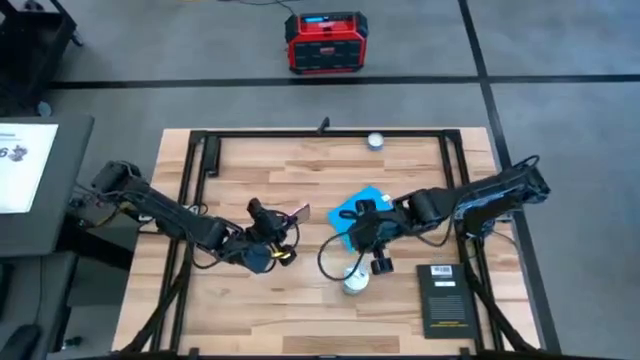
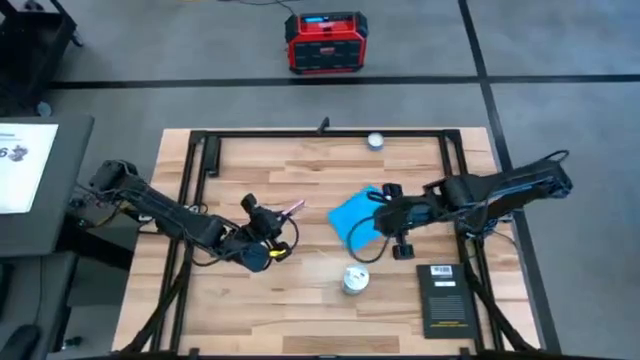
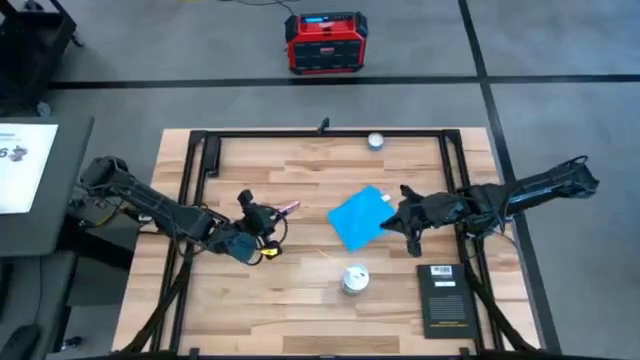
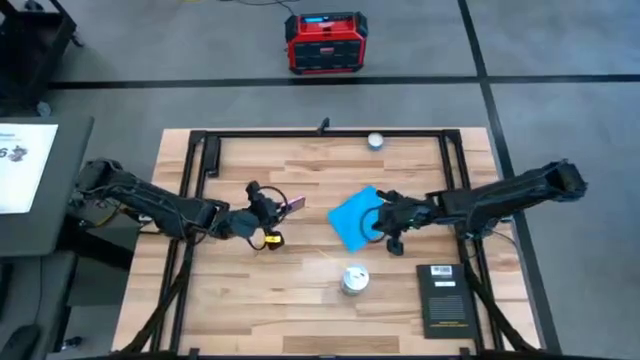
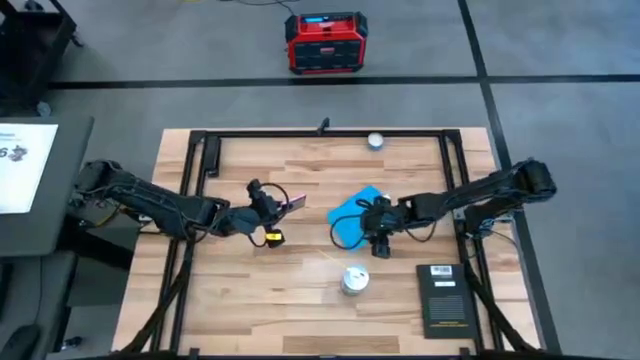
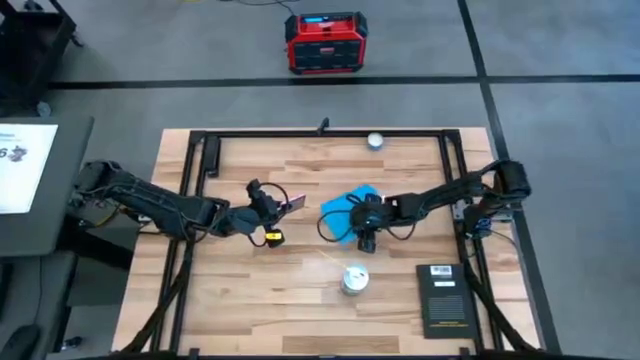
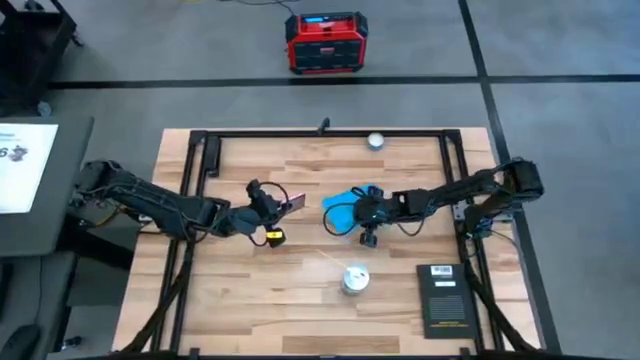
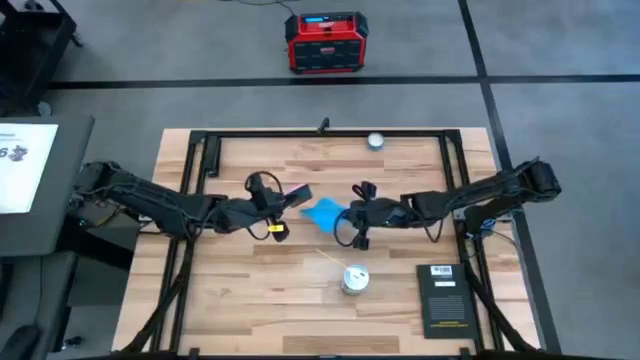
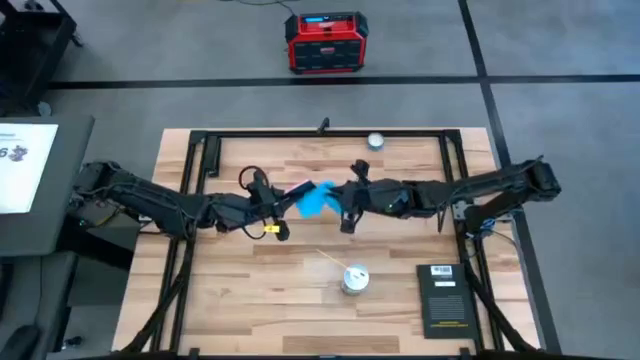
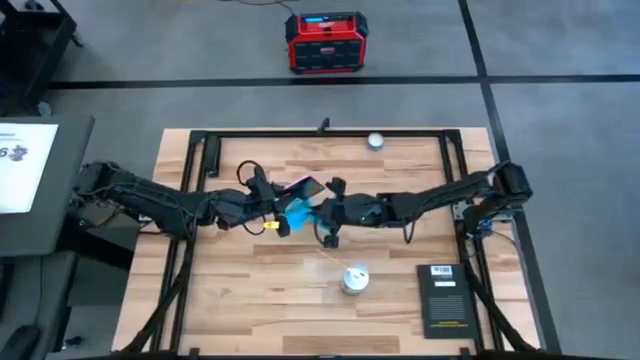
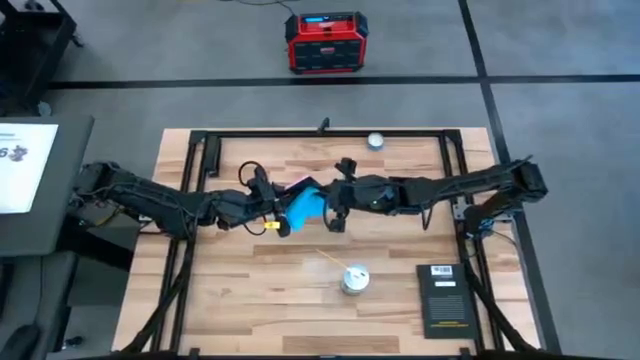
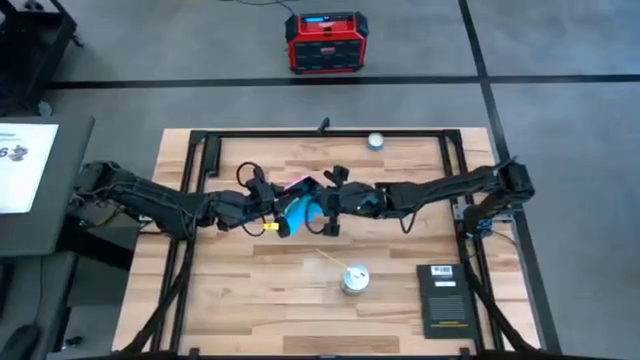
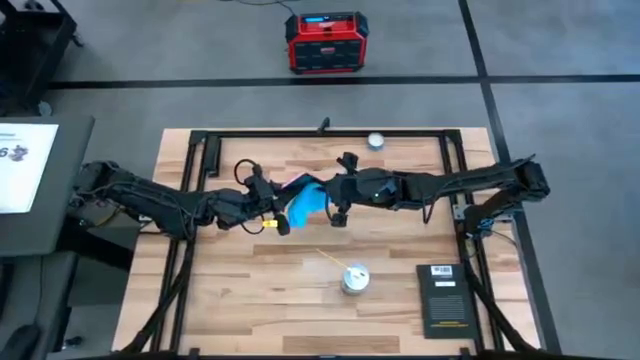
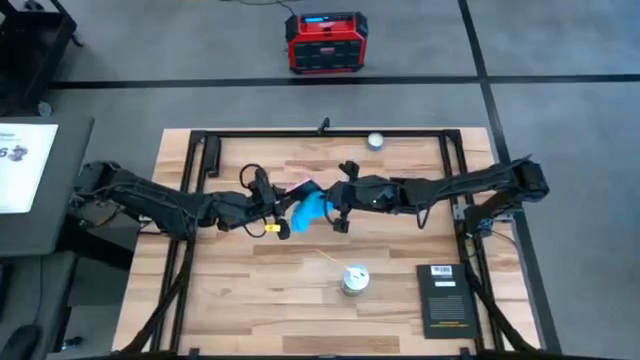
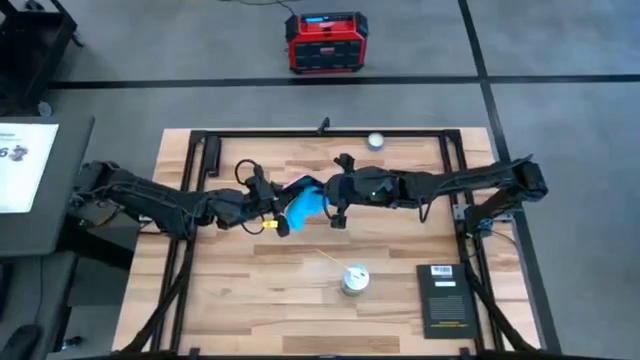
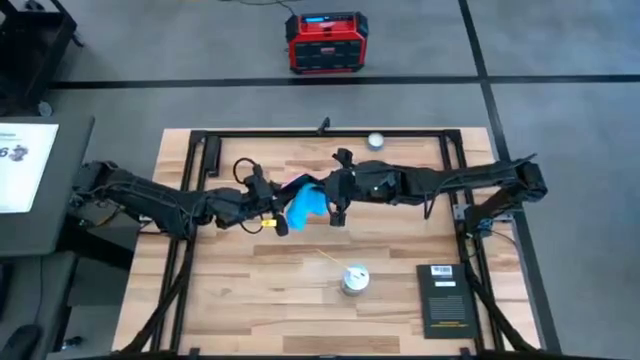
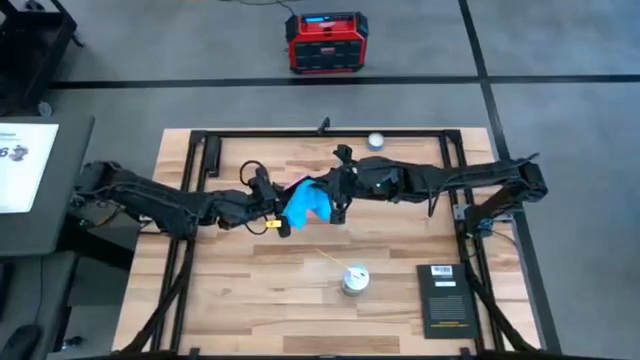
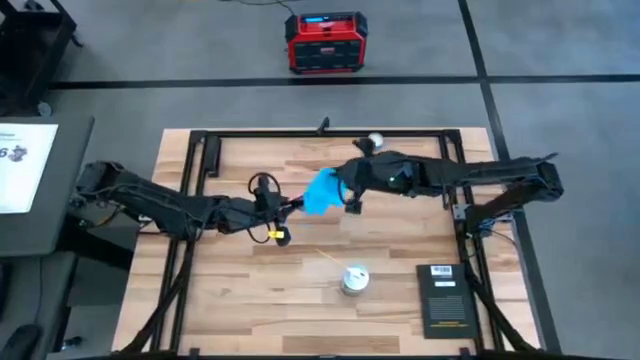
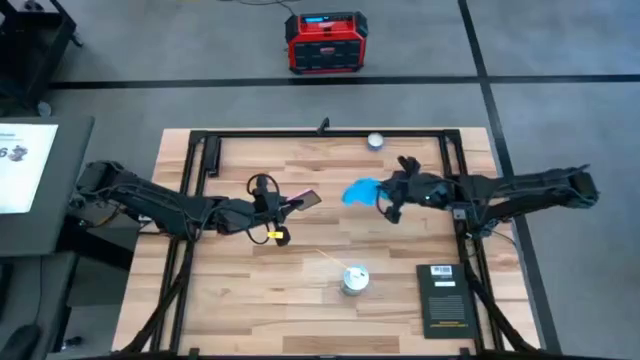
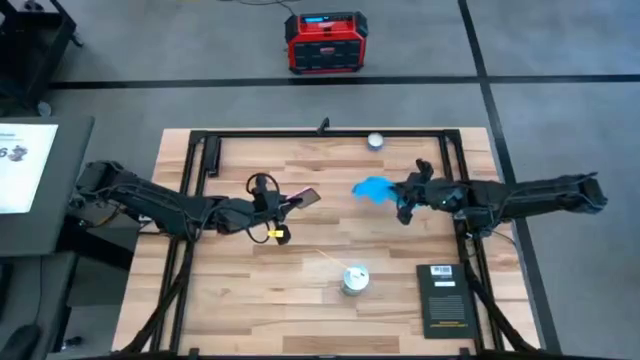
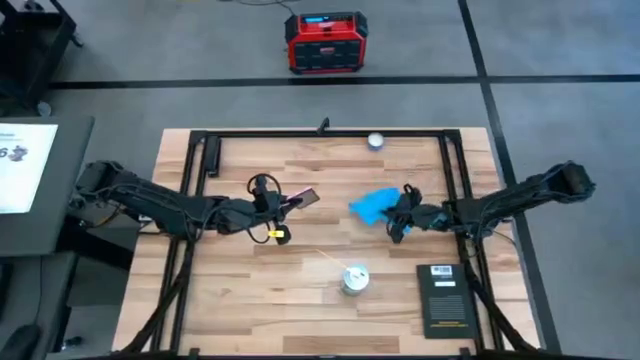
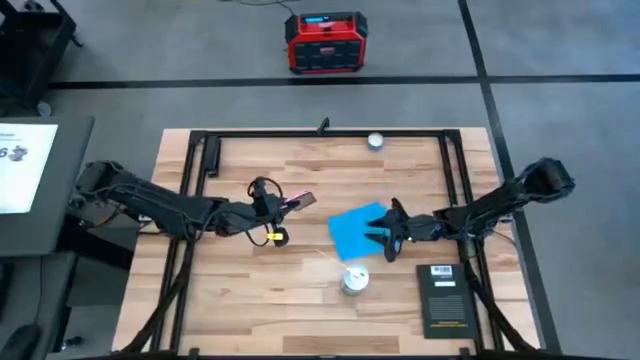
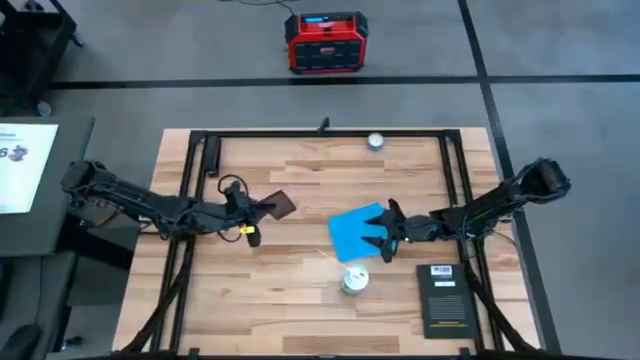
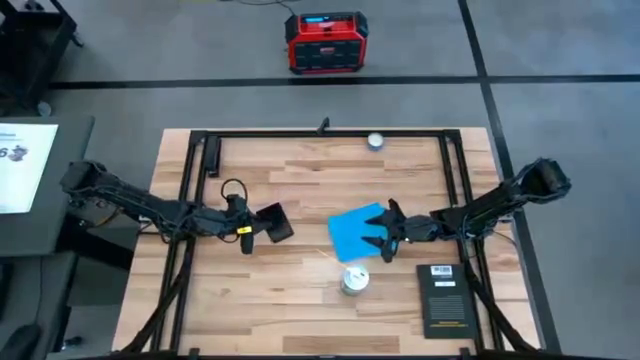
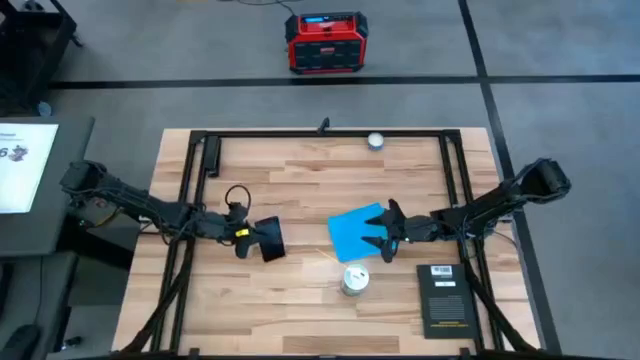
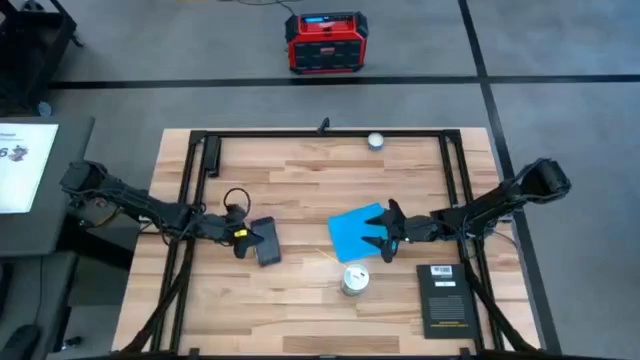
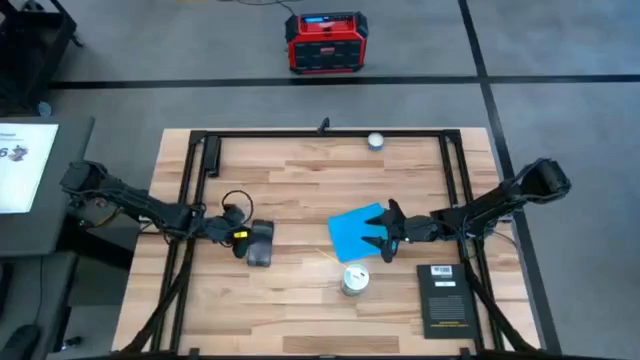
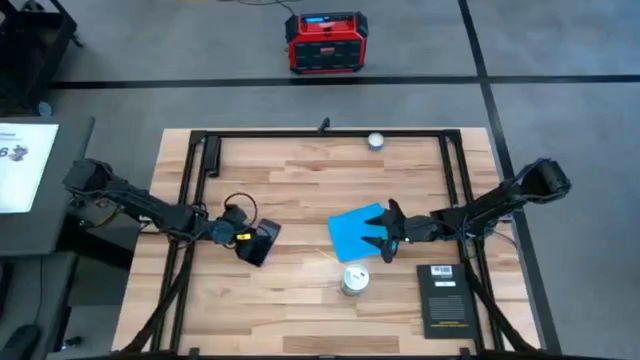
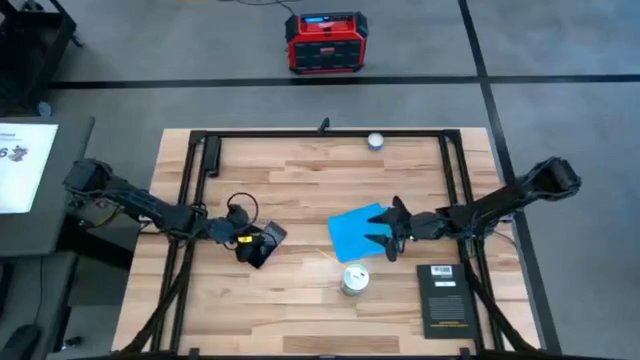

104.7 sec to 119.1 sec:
Task: Apply microfiber cloth
Wipe the device with a microfiber cloth

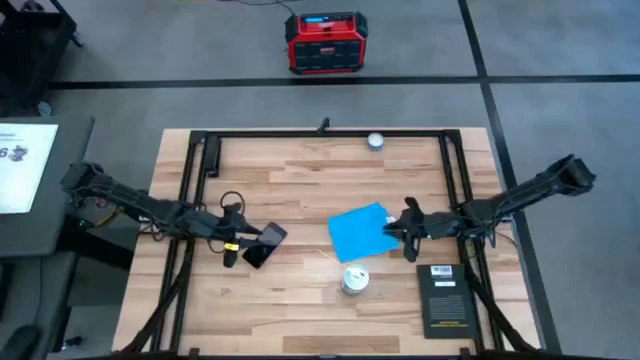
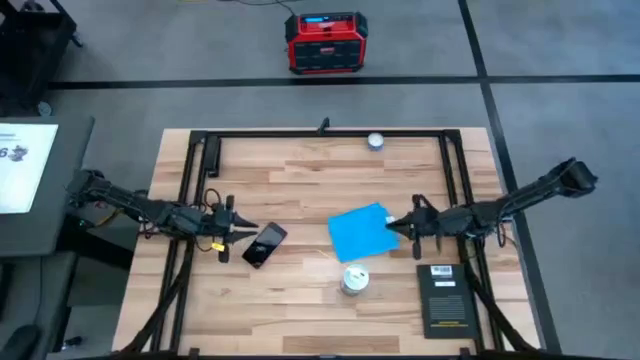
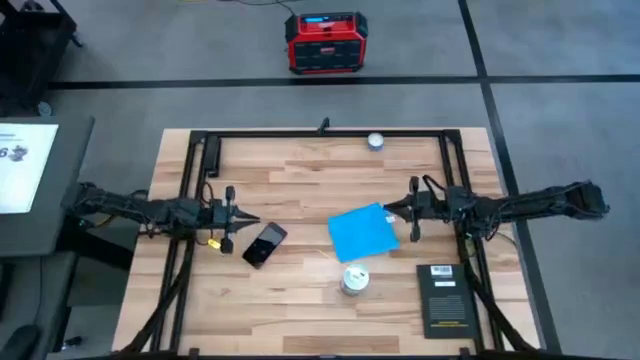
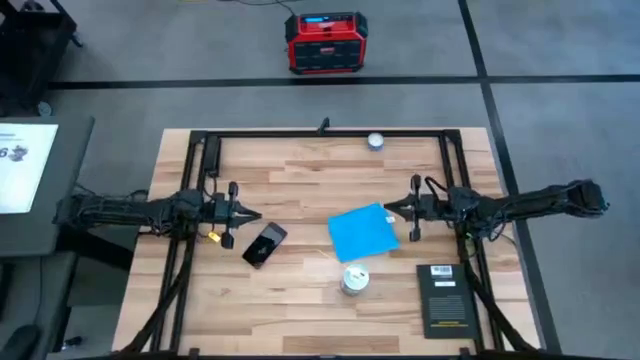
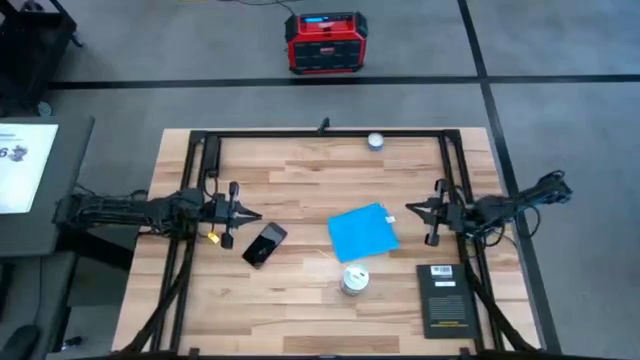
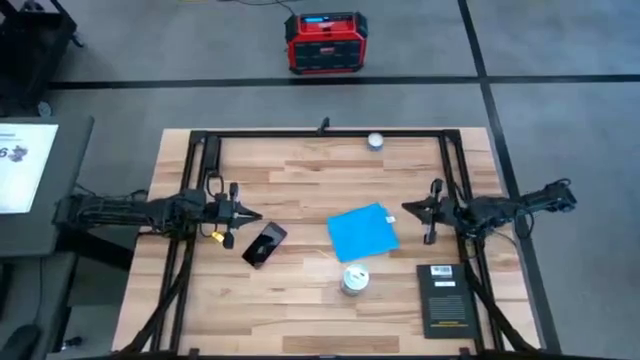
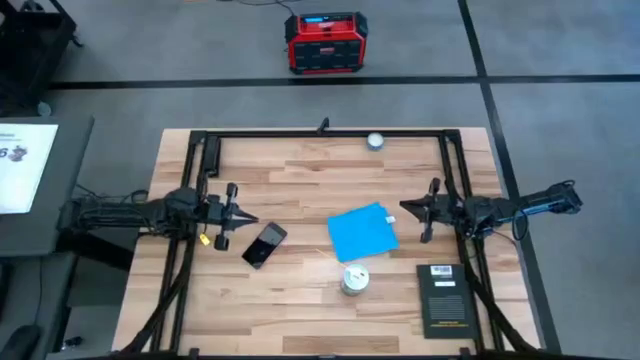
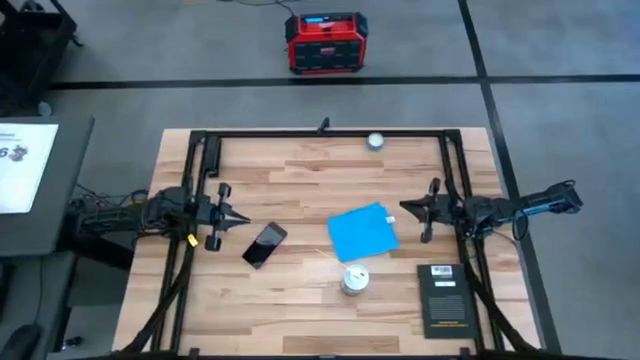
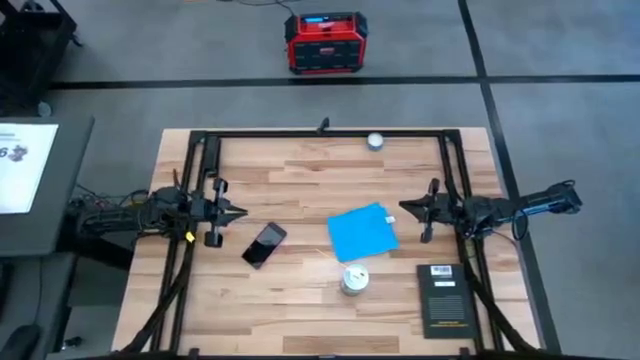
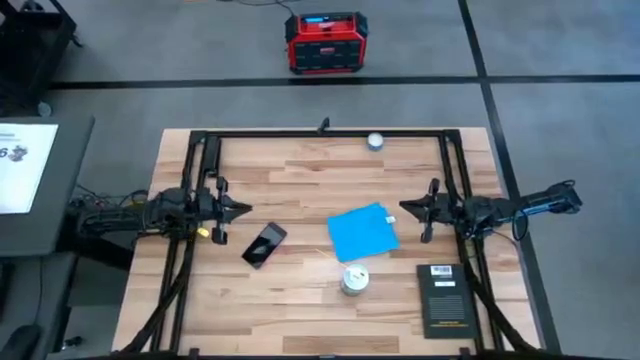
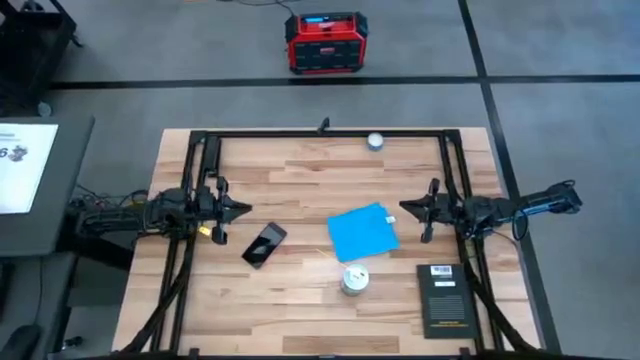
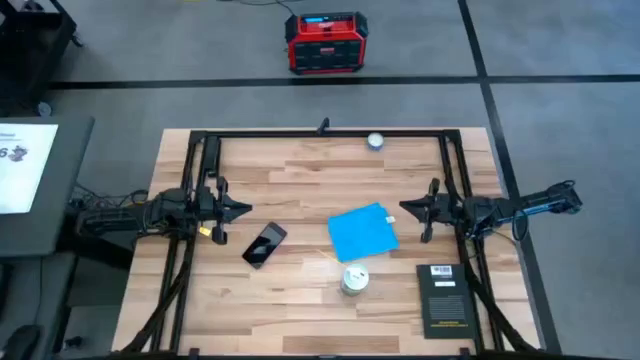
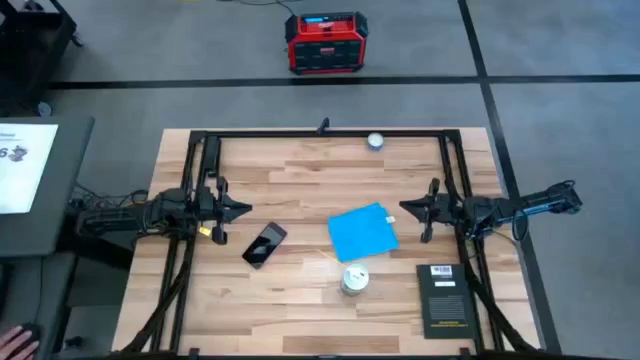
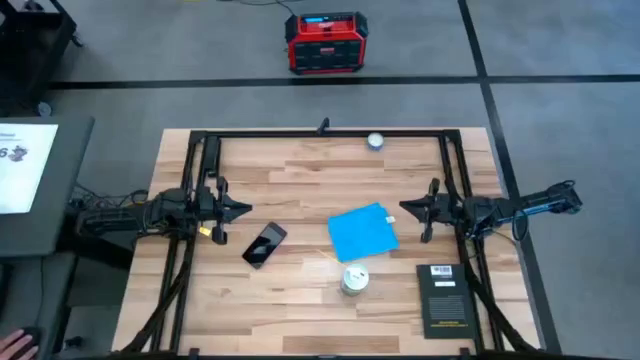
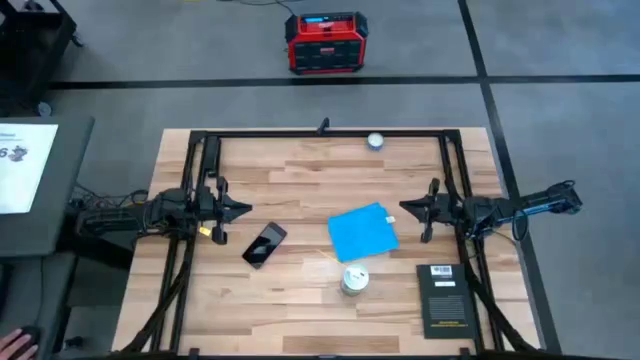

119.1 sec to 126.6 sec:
Return to Home Position
